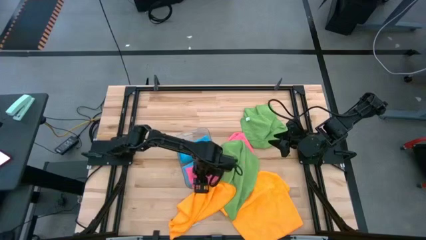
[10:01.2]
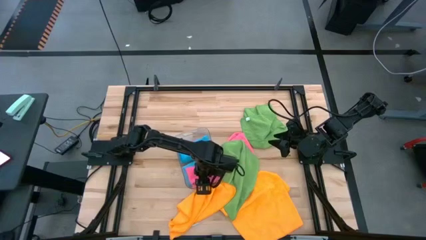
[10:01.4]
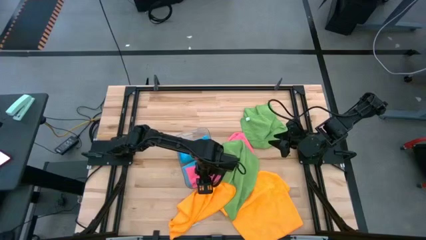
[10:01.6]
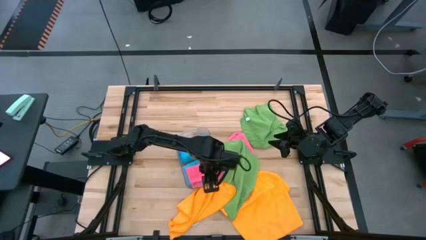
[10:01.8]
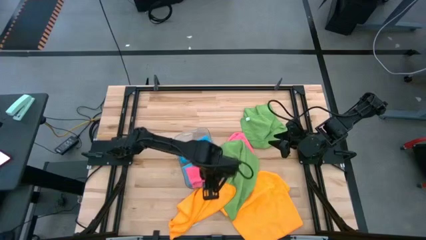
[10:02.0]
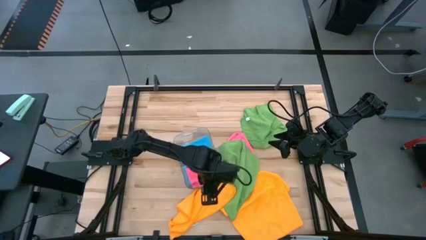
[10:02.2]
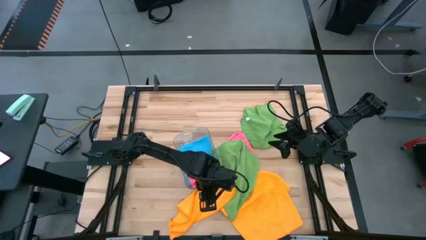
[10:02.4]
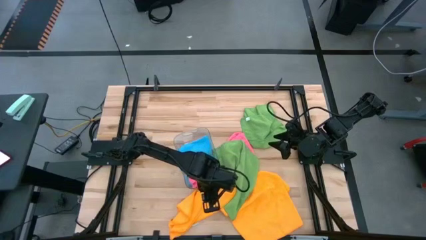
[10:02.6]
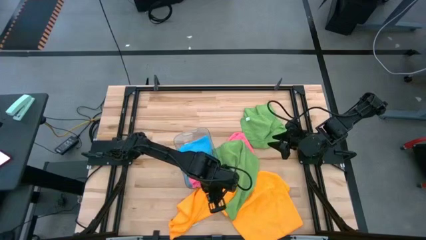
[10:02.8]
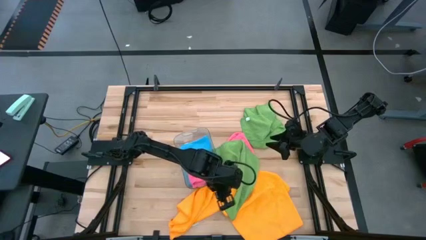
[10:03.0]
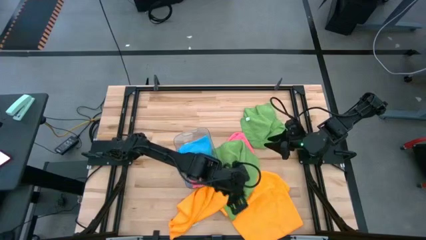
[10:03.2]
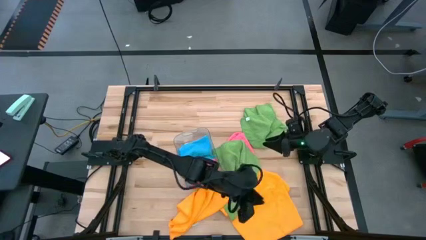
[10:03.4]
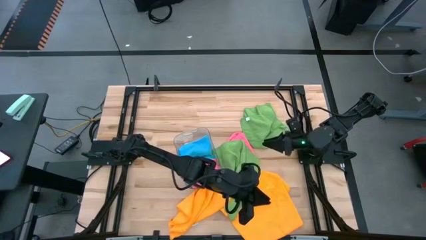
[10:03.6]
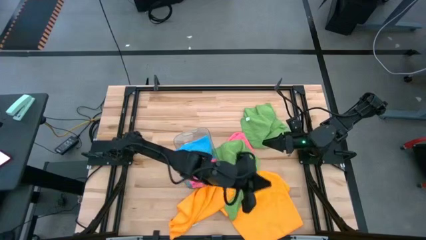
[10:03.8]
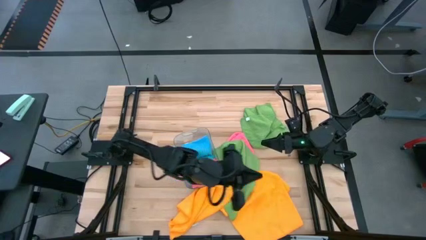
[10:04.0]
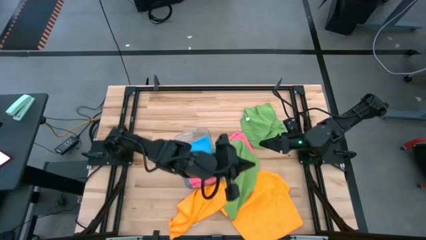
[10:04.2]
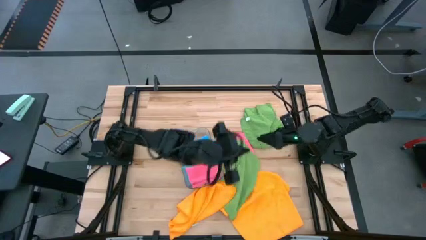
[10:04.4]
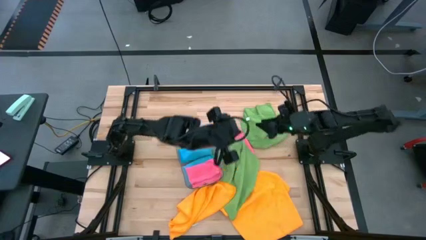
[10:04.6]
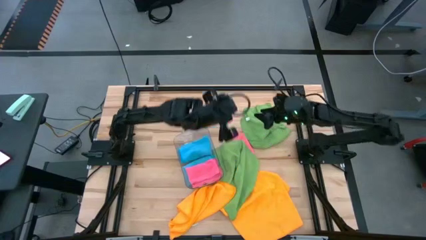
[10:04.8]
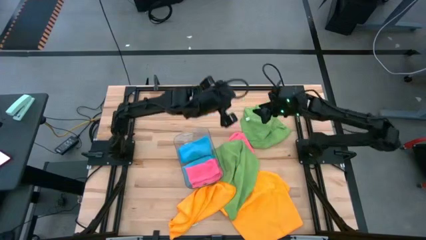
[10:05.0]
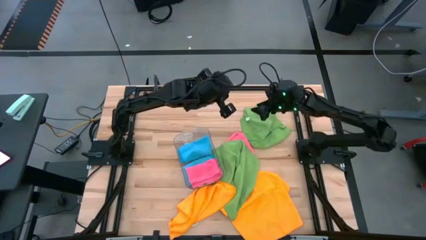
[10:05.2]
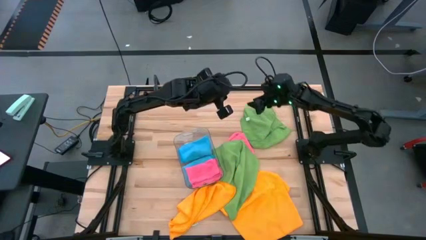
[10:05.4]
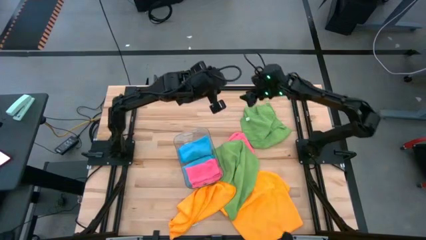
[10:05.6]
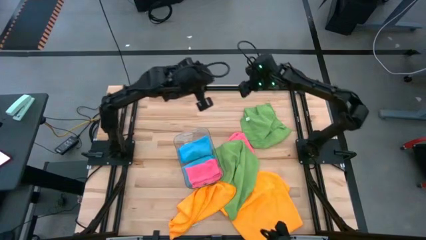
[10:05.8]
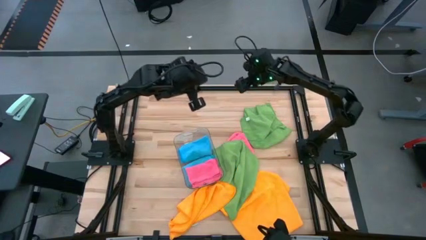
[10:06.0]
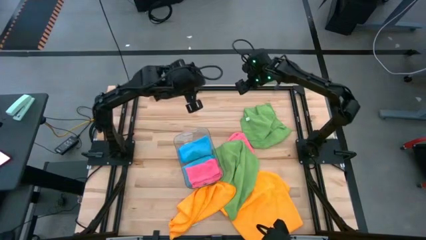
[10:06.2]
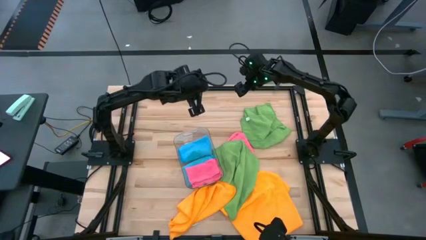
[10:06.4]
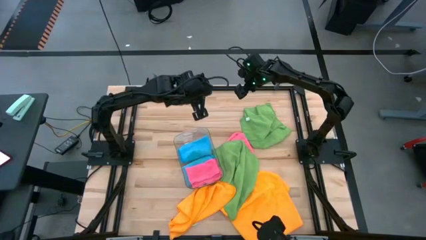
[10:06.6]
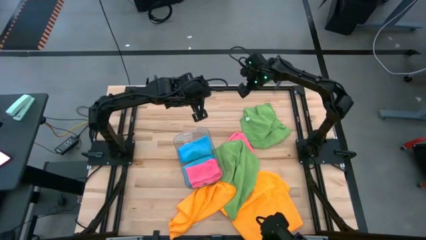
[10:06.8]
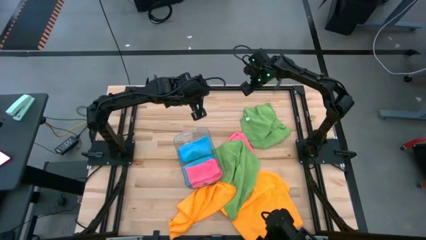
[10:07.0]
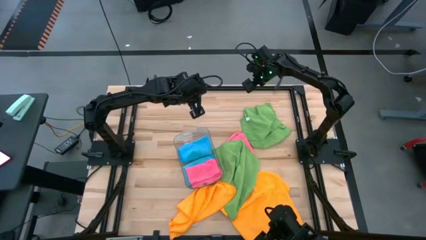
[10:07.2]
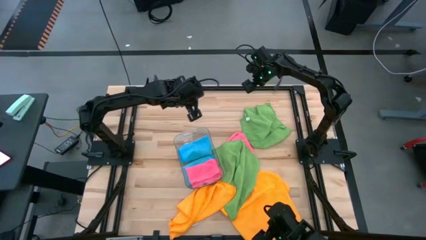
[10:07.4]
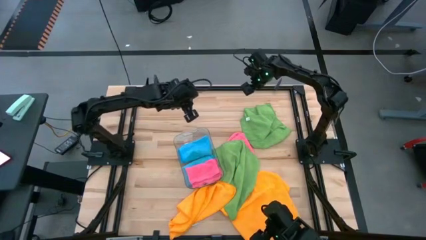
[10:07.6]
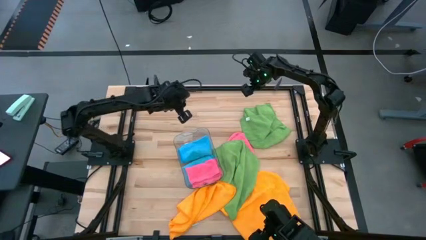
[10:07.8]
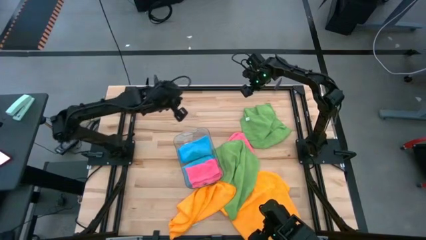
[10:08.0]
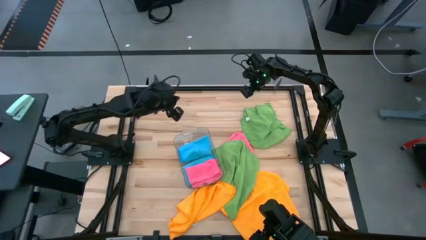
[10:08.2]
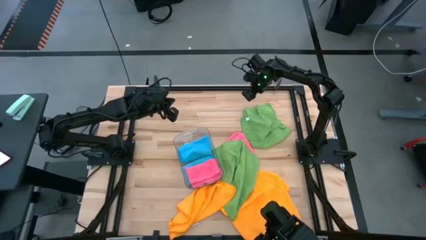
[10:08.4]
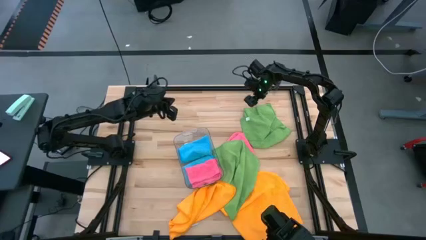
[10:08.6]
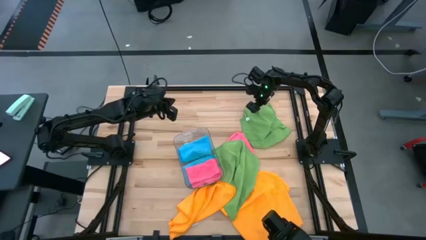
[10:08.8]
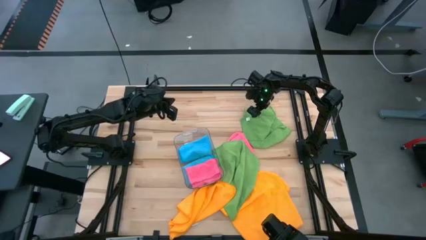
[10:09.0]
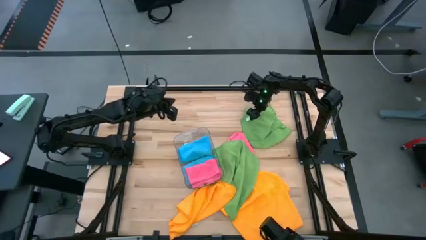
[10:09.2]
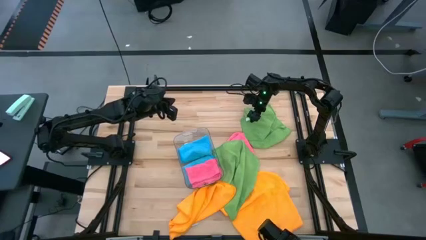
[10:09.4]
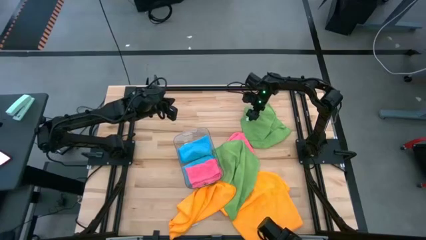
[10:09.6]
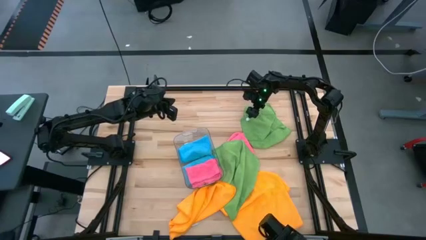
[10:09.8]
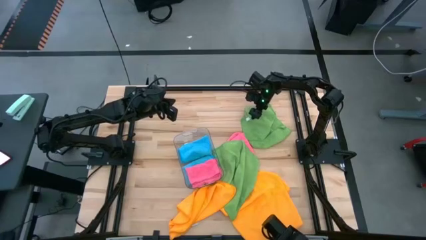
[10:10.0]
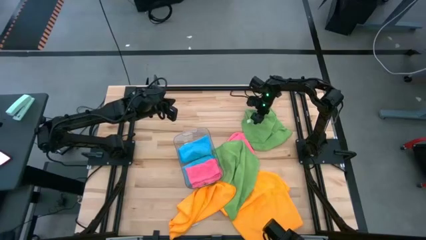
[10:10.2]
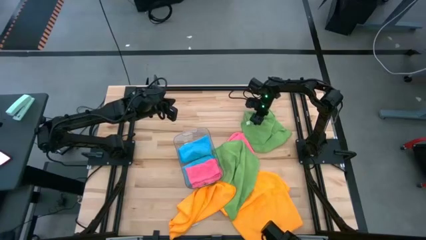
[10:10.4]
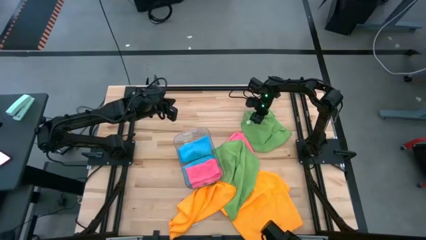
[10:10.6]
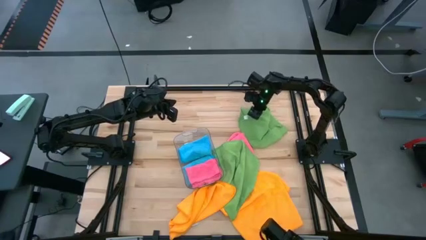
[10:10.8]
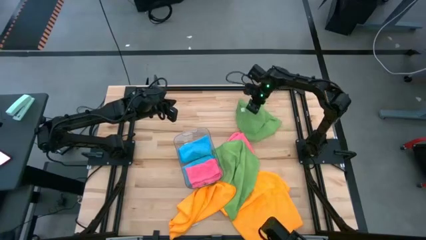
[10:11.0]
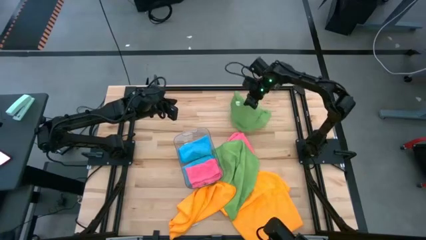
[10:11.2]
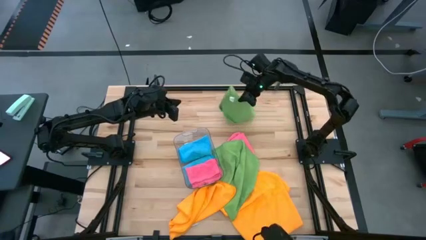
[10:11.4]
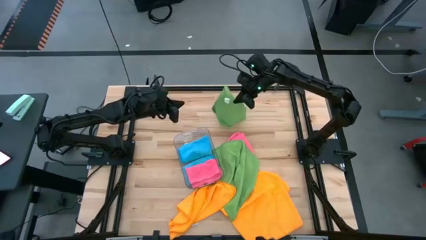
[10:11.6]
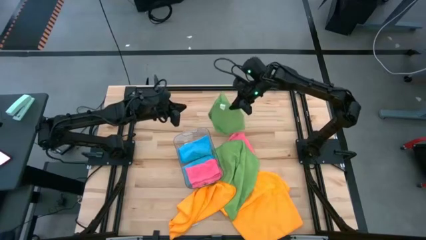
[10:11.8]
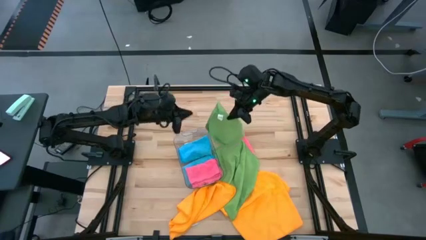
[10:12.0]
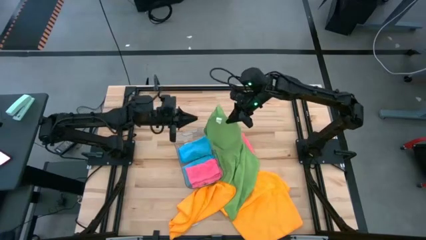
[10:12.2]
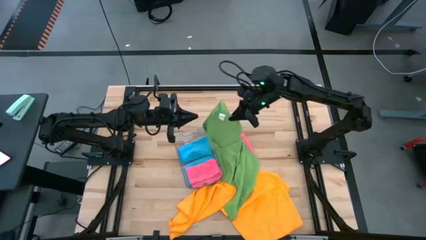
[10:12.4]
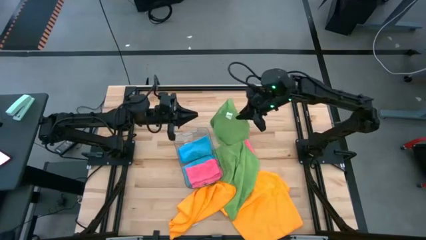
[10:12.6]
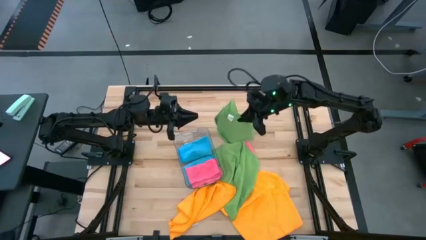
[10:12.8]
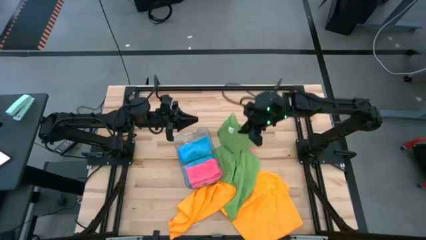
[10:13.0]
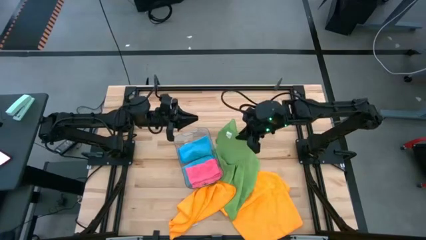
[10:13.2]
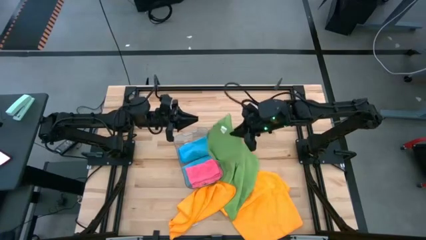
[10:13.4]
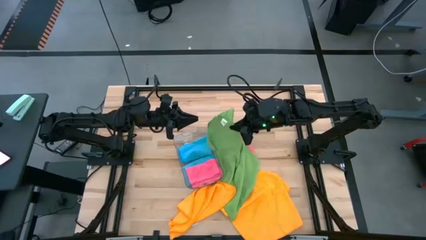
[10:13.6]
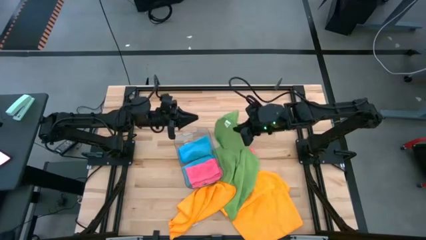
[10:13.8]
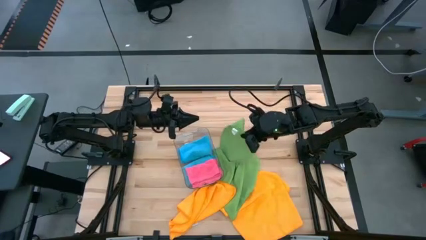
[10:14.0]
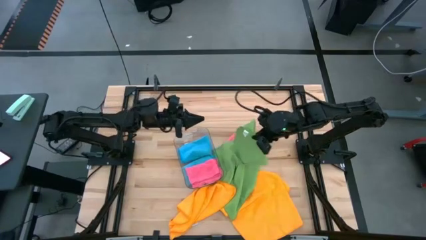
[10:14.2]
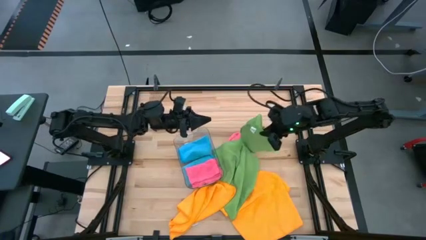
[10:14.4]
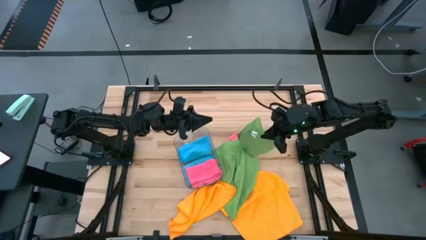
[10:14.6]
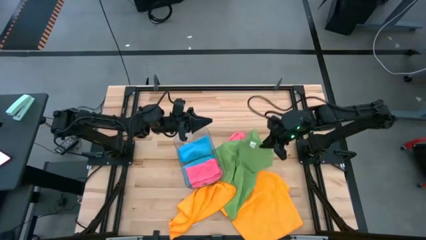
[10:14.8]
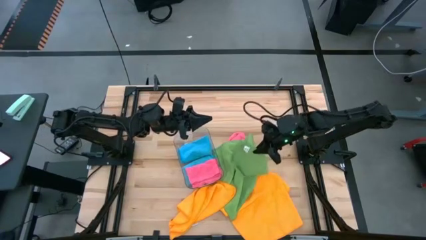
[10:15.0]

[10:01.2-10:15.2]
Task: Fold microfiber towels
Fold the top green towel
